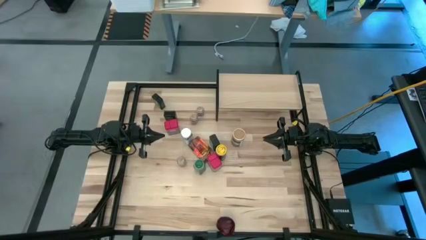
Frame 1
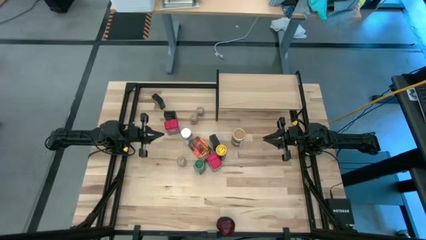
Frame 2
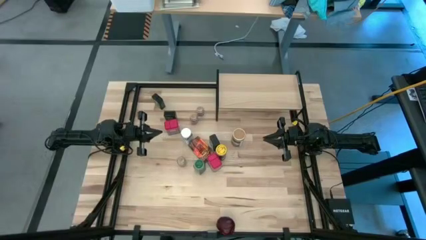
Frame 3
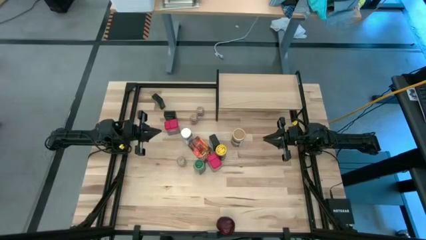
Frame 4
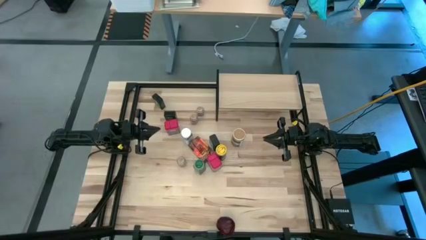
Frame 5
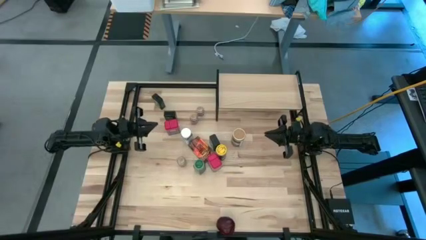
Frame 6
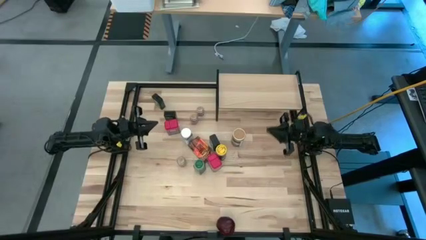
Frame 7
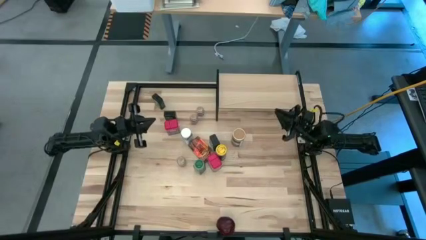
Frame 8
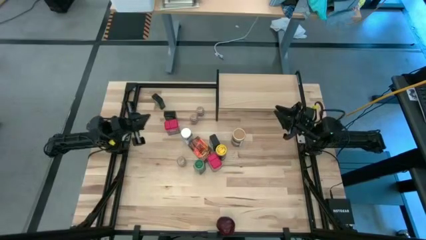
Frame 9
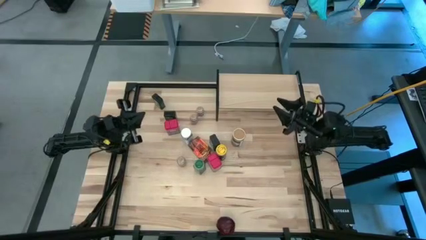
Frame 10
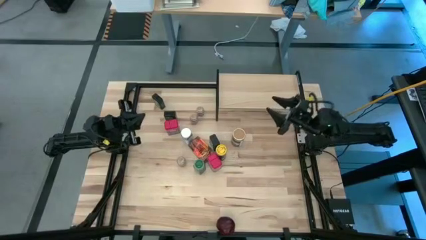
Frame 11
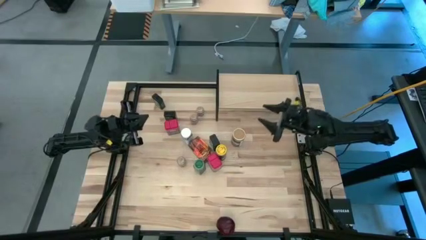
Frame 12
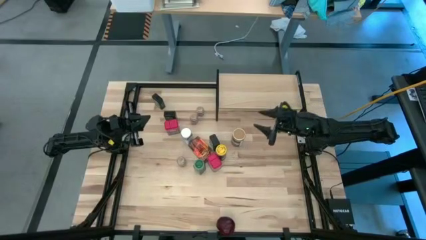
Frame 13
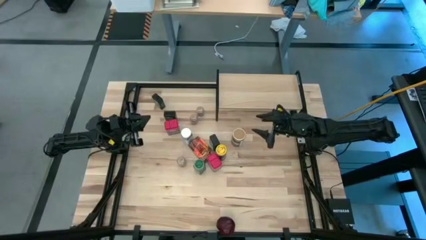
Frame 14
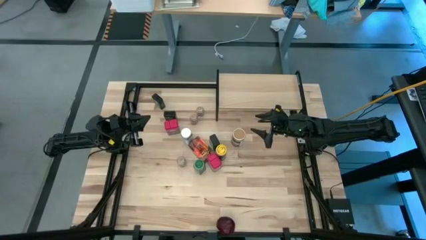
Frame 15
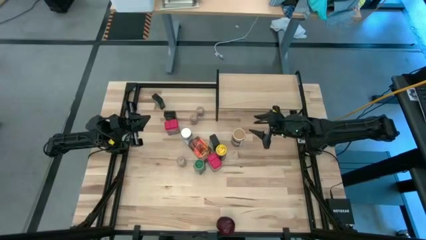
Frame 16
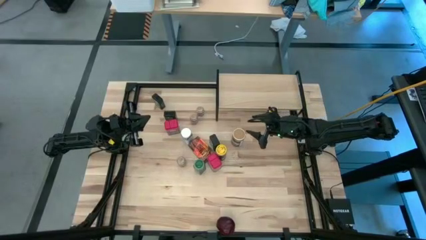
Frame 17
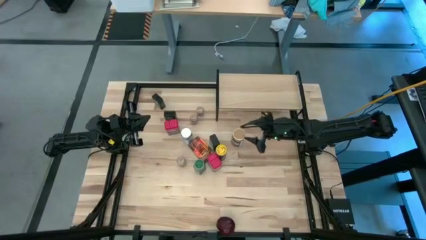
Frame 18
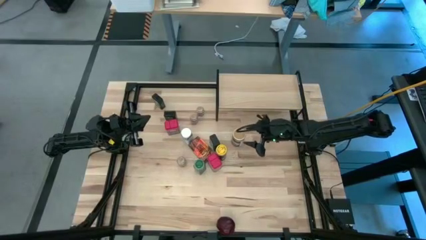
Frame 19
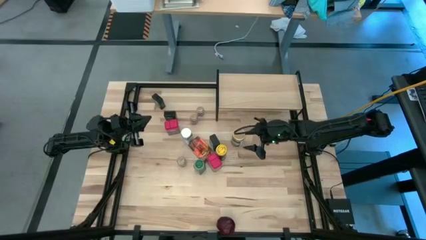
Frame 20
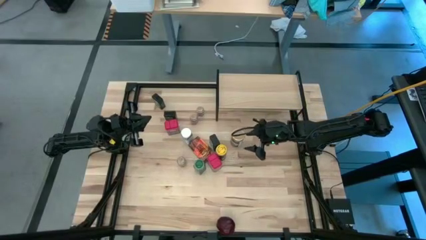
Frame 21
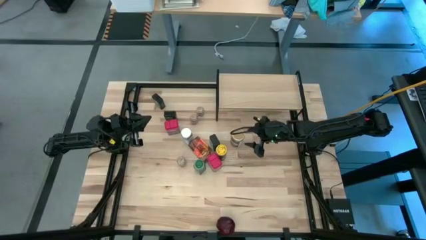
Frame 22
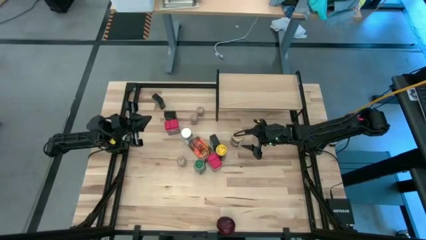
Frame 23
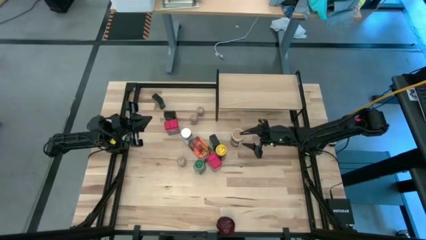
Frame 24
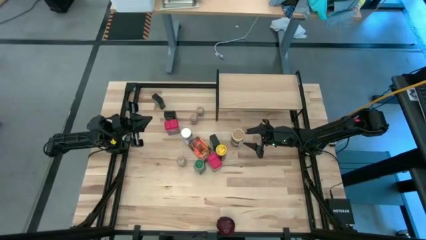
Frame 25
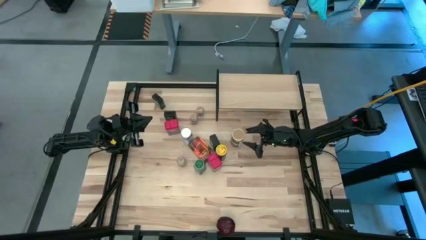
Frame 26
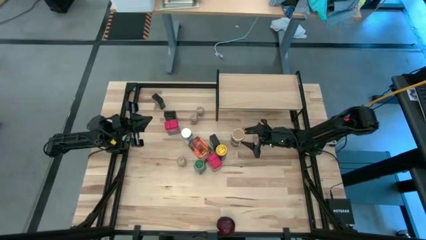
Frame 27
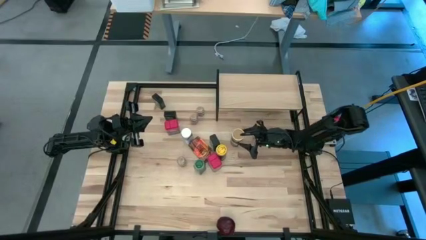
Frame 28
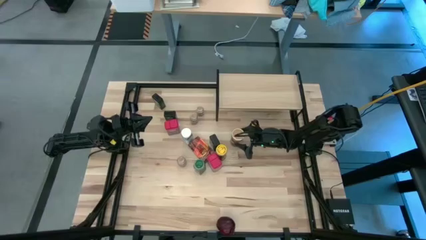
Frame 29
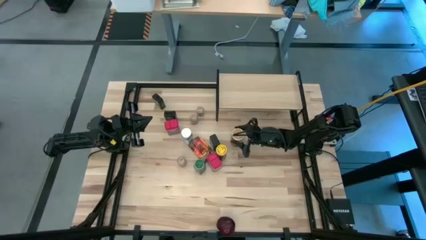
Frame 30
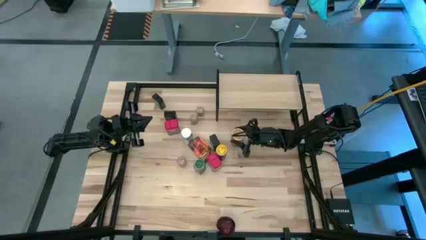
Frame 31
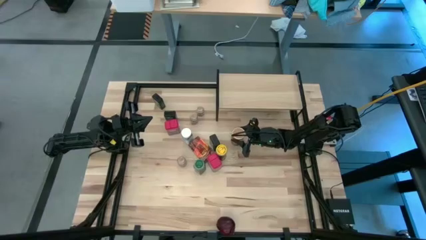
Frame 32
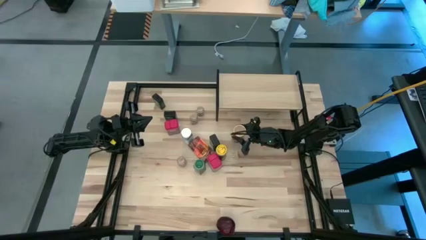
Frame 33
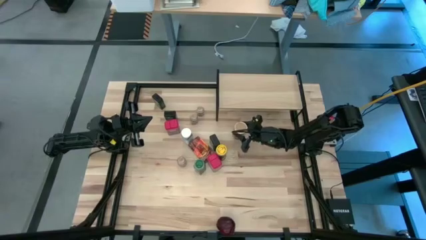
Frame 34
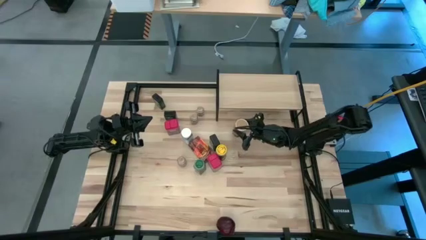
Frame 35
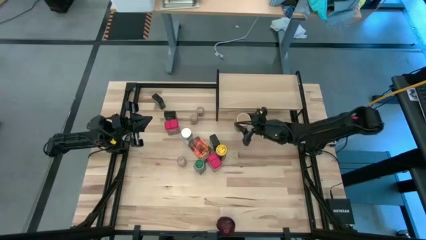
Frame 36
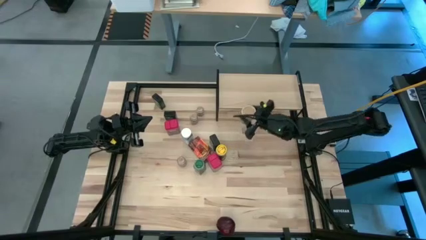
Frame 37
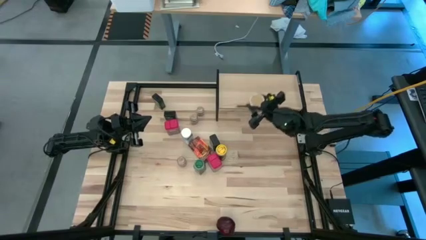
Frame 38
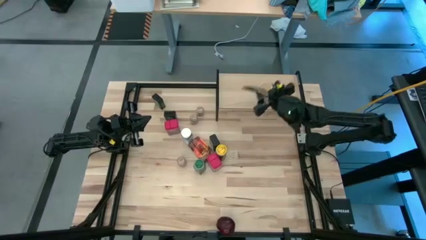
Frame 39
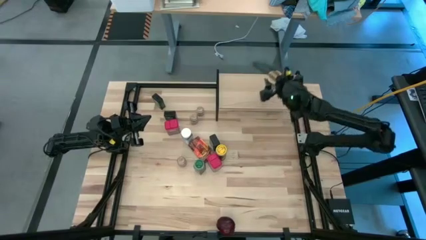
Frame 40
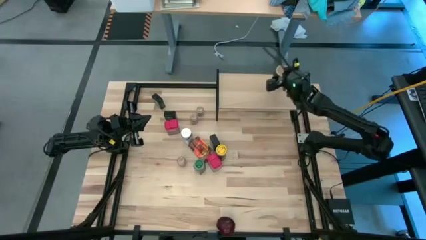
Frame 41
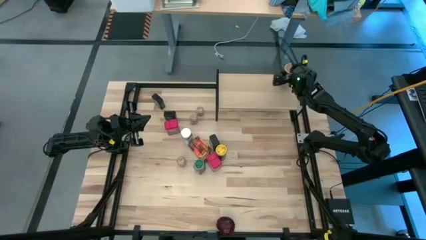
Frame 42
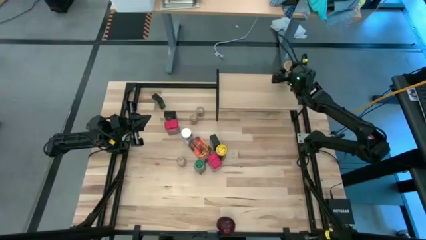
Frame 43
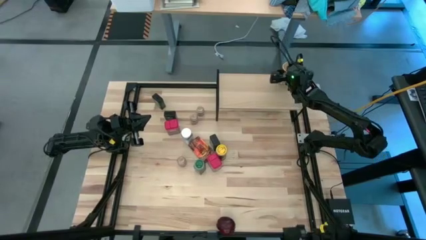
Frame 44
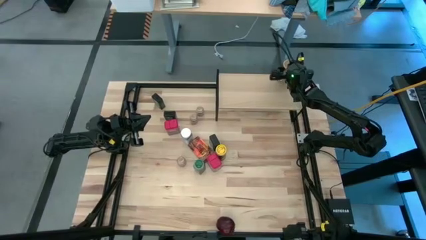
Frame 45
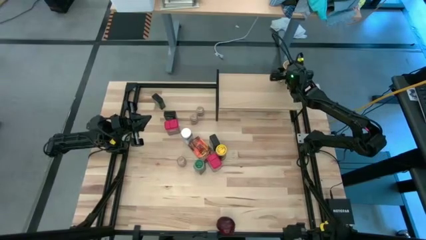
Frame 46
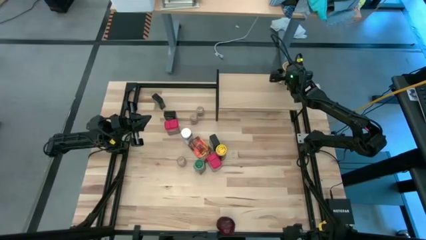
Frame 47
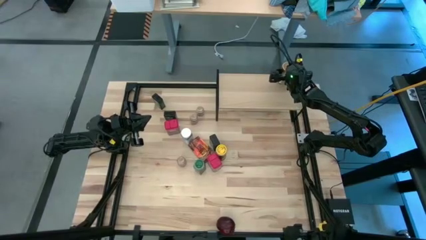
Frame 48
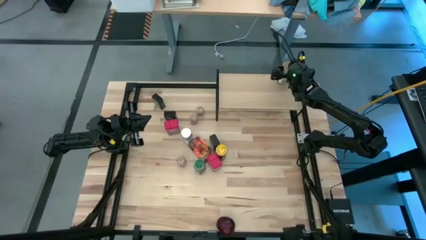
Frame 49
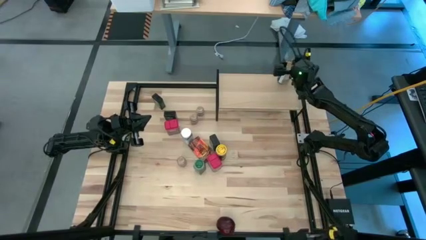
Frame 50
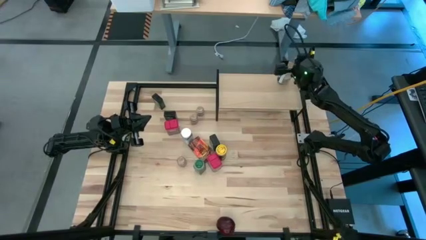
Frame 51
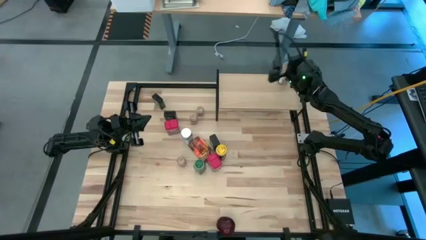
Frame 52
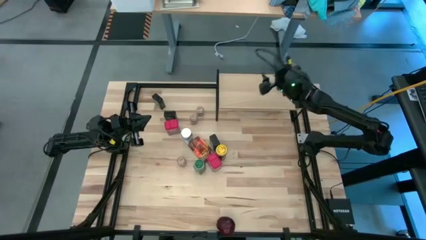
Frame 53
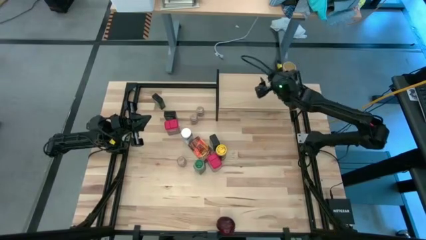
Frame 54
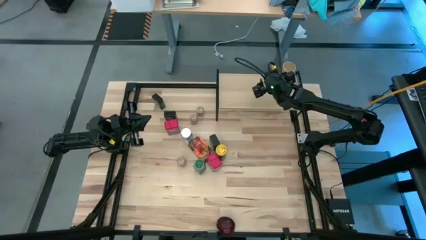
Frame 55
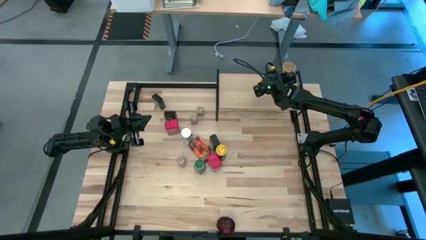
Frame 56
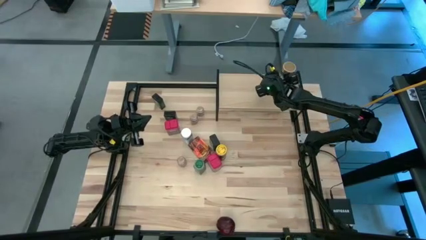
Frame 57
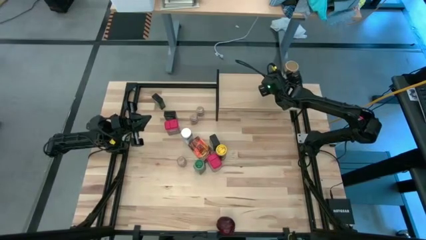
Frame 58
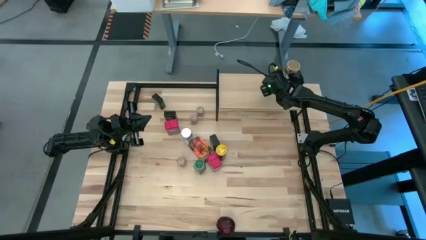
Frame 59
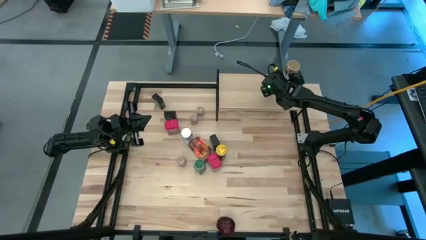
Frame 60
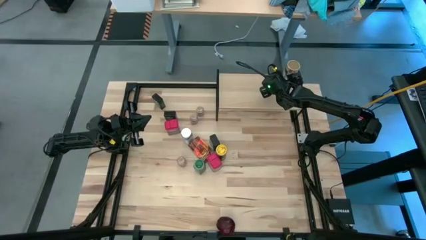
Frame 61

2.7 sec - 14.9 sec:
Task: Shelf spices
Put the brown seasoning bottle on the the shelf
